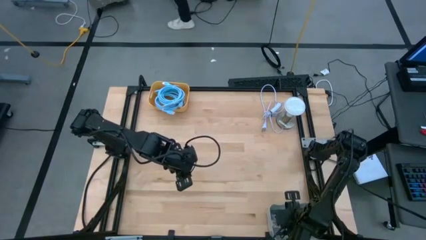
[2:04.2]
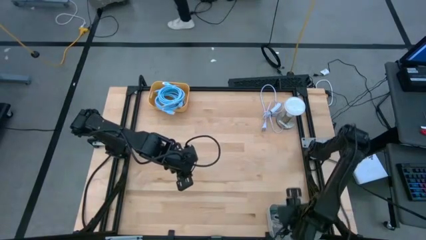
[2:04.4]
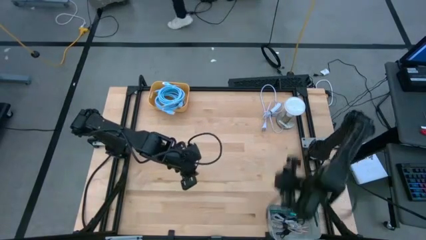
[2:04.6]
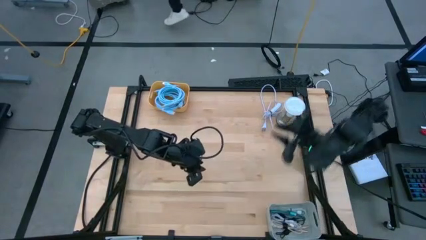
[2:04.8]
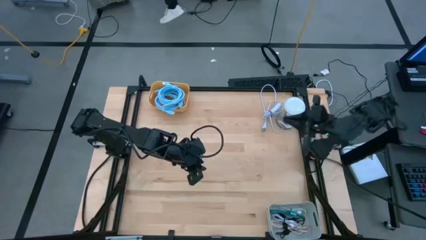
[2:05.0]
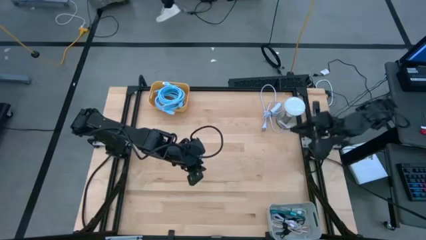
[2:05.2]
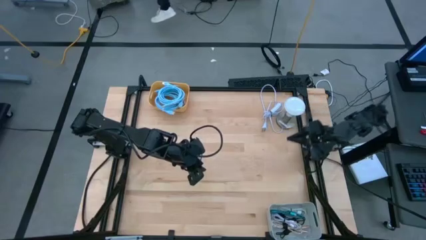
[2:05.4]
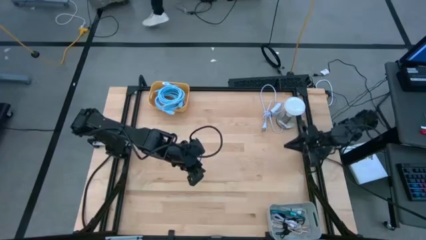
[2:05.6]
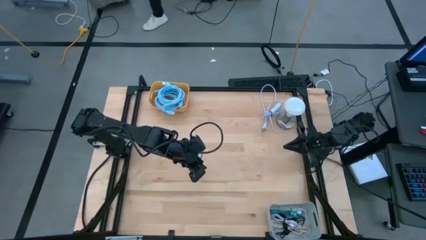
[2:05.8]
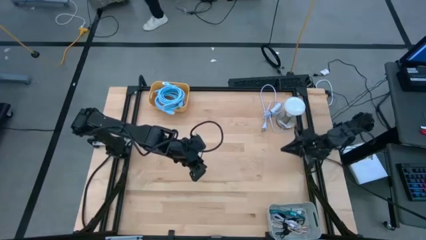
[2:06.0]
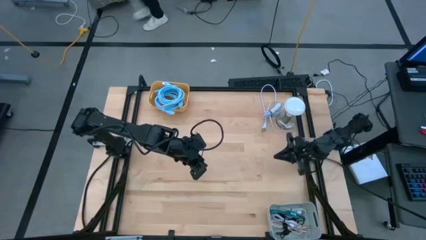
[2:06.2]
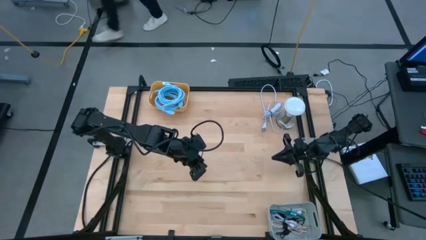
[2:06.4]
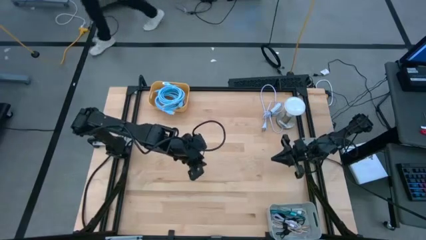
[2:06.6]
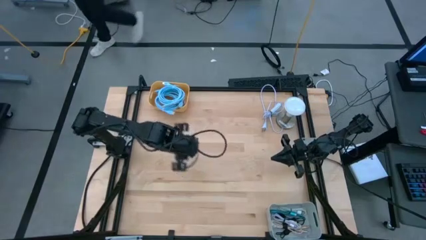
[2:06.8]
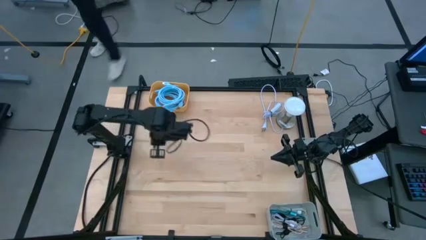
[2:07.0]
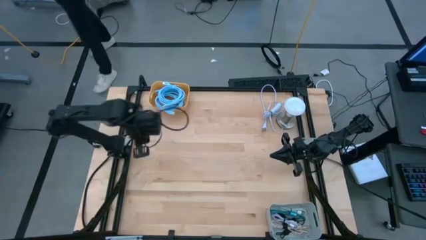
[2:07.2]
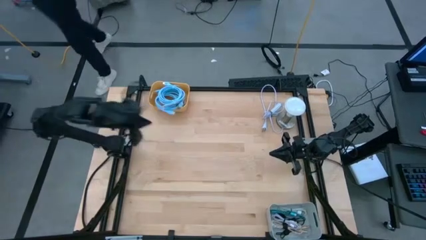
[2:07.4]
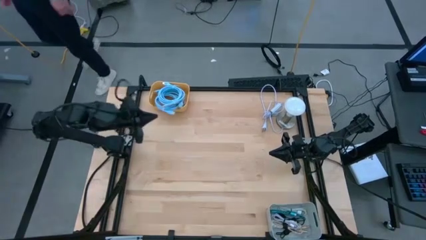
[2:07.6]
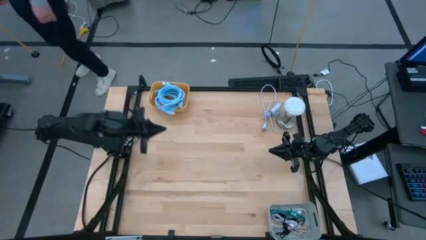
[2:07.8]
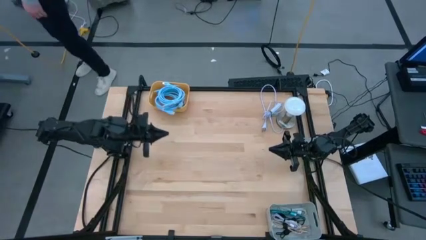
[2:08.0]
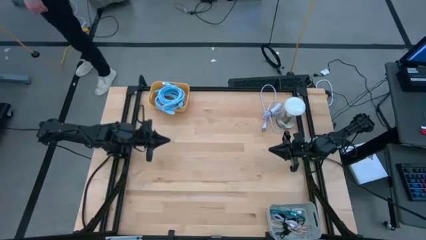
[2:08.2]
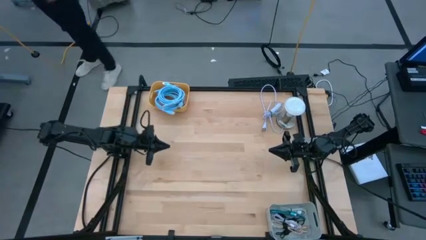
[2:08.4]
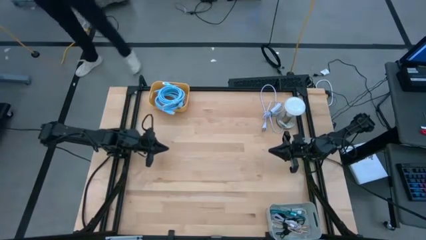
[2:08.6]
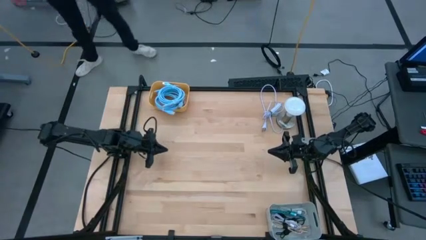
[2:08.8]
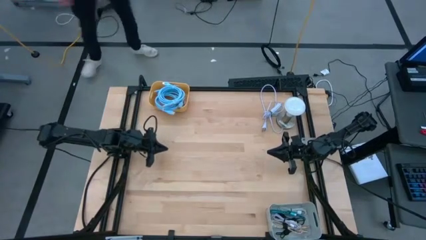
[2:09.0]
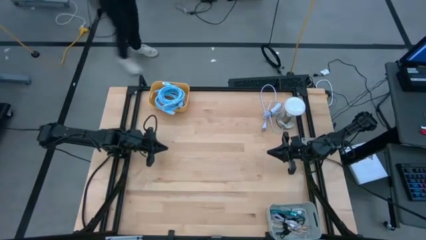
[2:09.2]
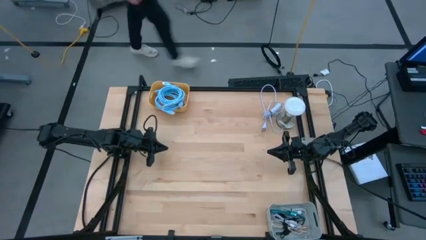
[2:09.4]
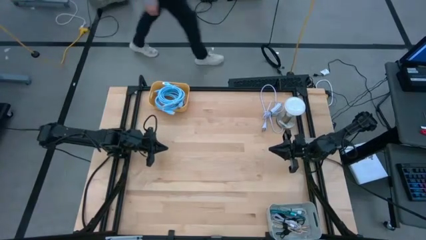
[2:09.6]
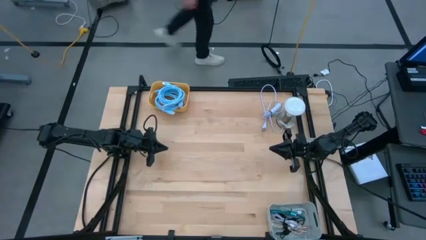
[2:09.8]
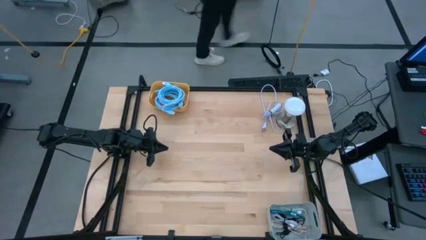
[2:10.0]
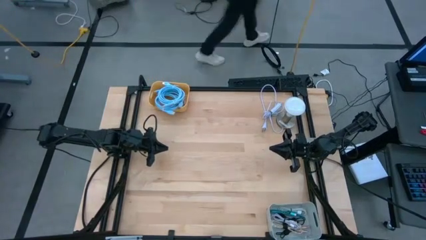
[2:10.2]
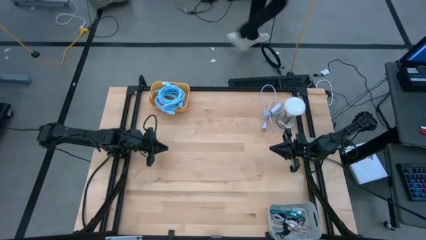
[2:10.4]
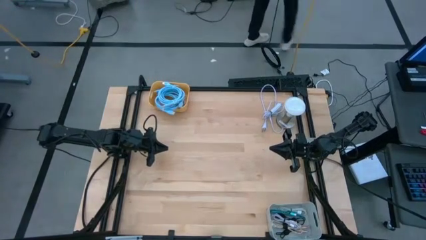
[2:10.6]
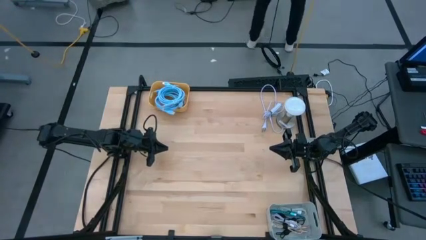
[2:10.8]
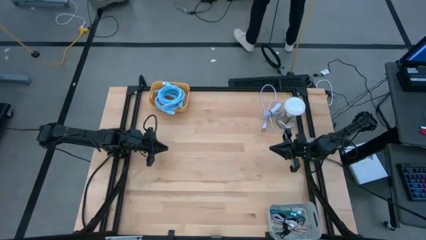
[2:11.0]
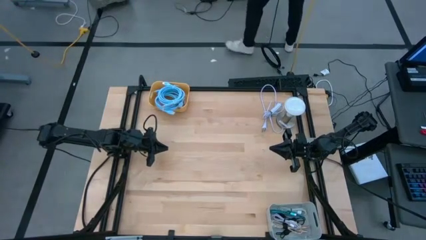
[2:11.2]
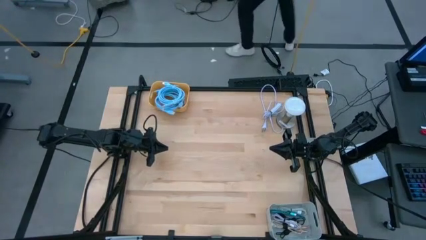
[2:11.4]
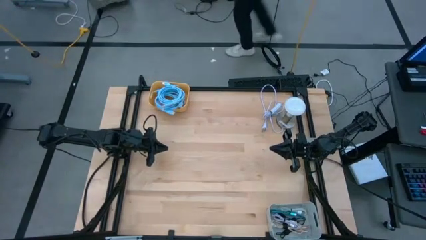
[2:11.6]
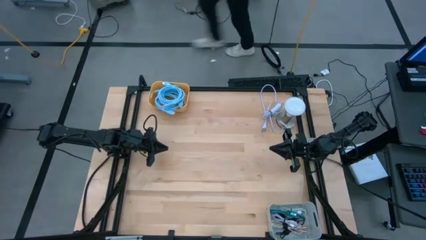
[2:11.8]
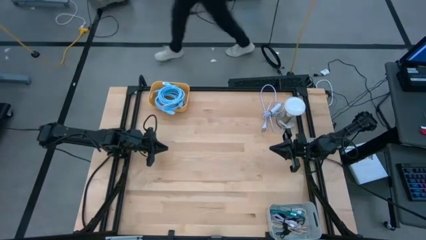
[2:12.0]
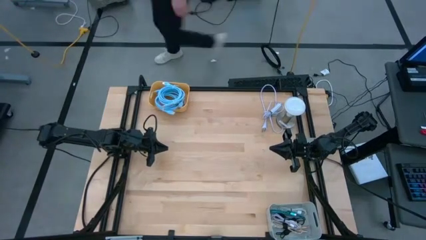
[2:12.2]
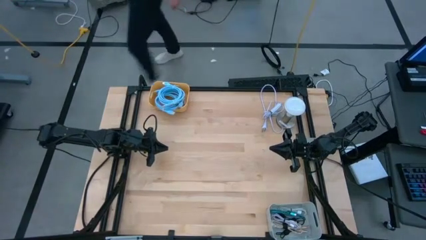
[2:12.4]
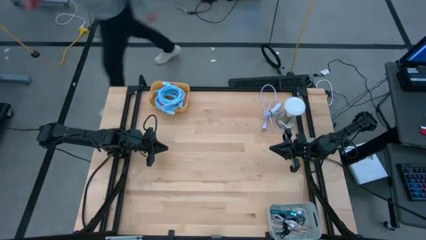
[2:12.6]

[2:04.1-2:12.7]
Task: Pick & Place USB Port
Return to Home Position

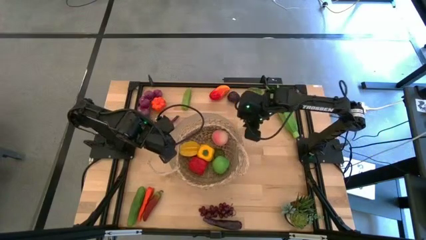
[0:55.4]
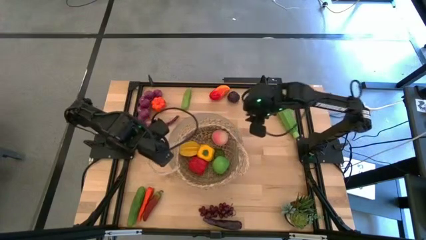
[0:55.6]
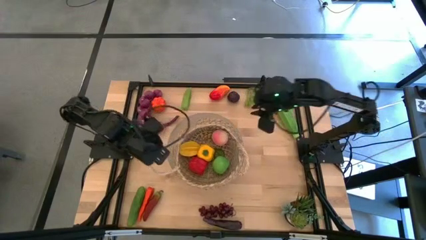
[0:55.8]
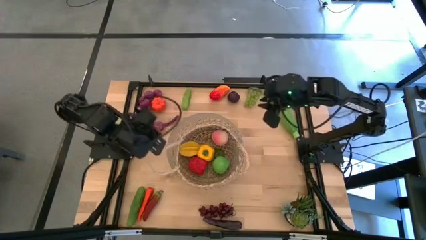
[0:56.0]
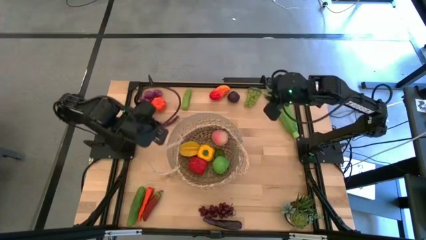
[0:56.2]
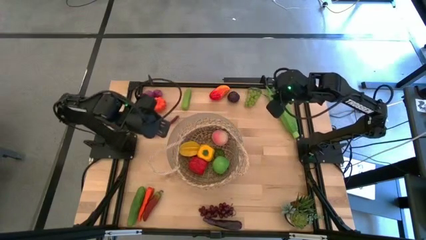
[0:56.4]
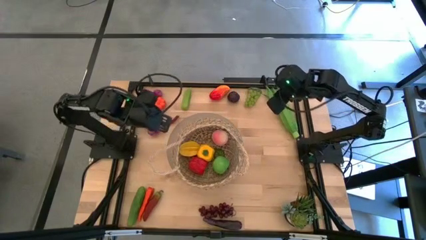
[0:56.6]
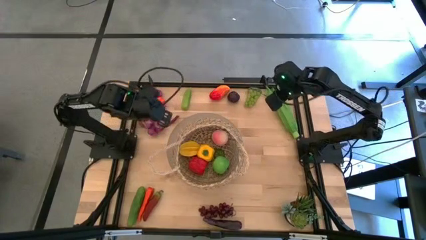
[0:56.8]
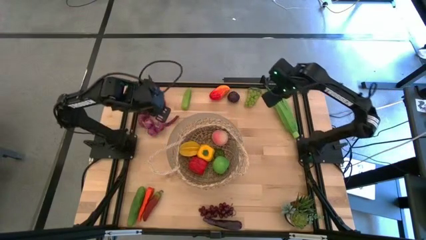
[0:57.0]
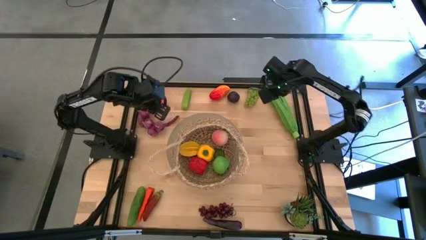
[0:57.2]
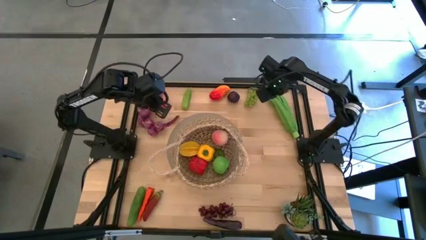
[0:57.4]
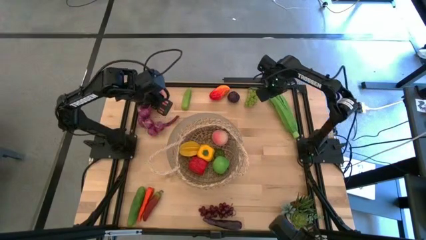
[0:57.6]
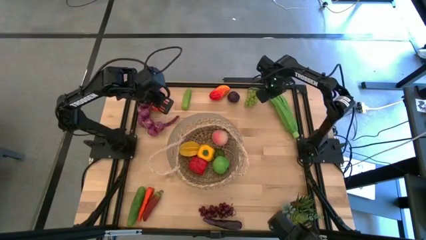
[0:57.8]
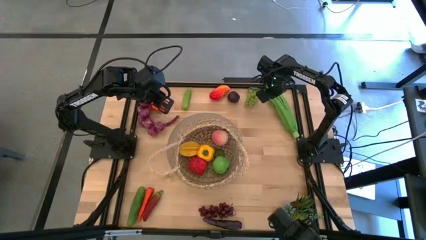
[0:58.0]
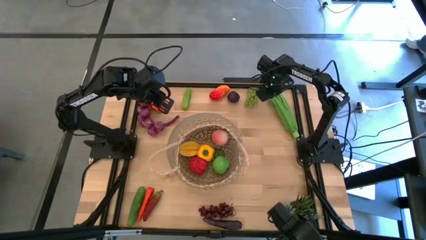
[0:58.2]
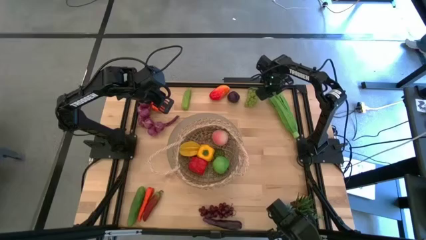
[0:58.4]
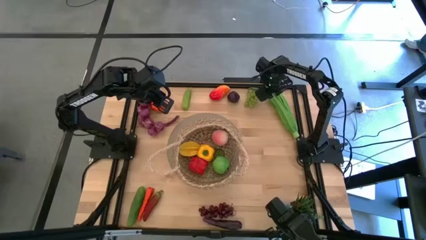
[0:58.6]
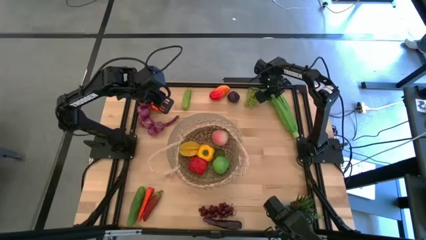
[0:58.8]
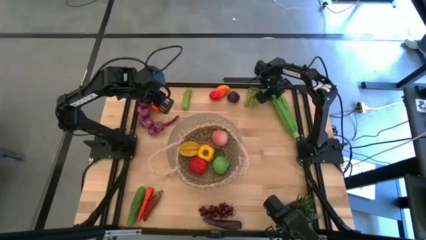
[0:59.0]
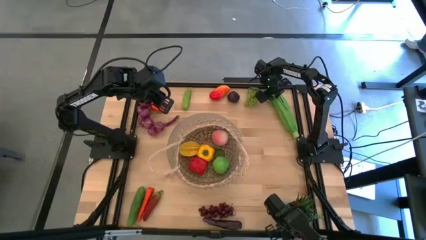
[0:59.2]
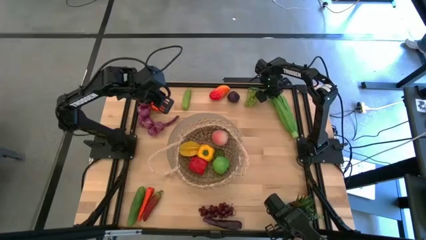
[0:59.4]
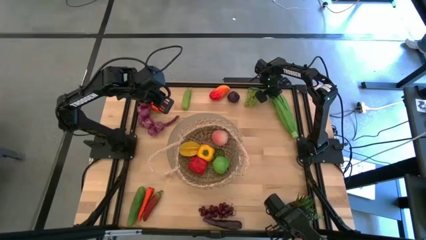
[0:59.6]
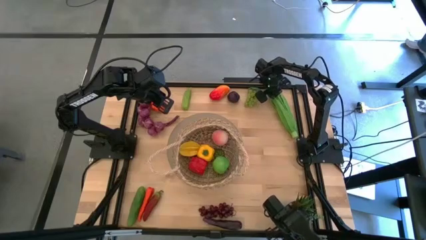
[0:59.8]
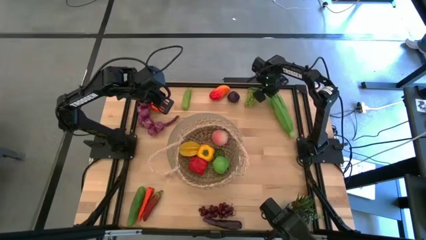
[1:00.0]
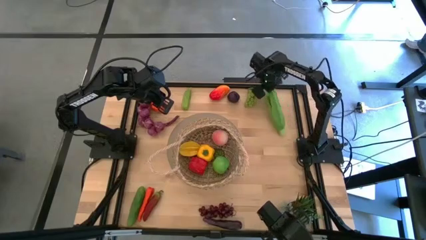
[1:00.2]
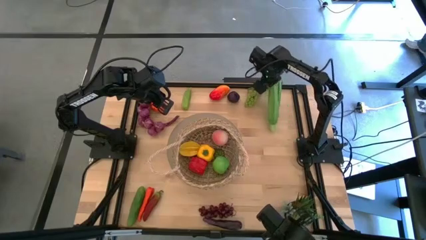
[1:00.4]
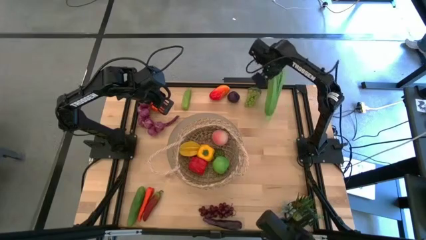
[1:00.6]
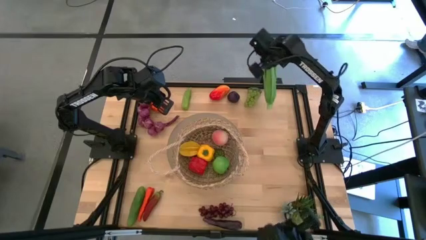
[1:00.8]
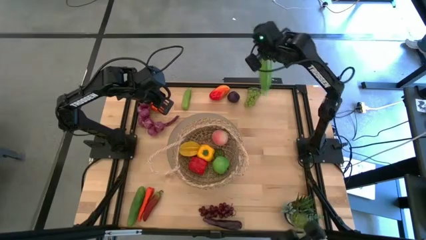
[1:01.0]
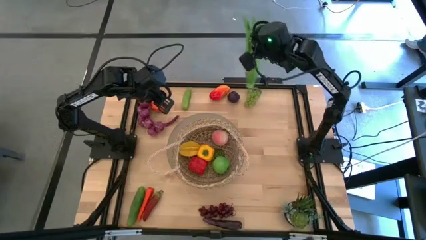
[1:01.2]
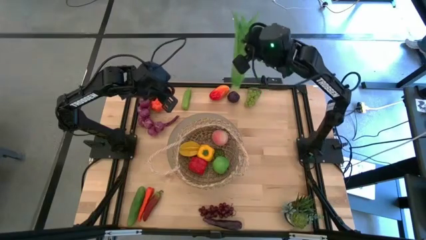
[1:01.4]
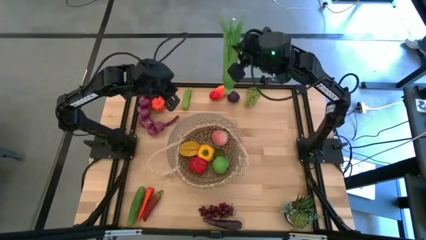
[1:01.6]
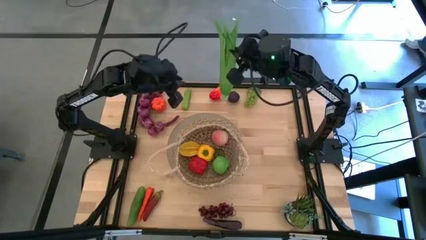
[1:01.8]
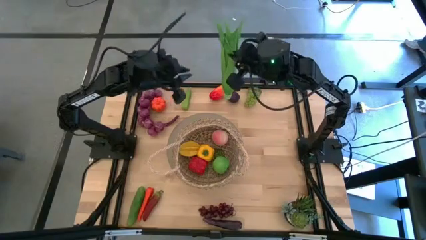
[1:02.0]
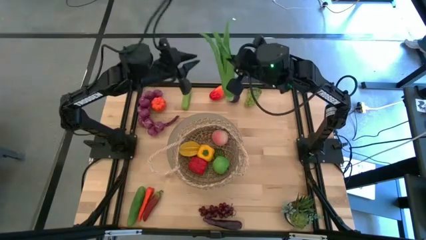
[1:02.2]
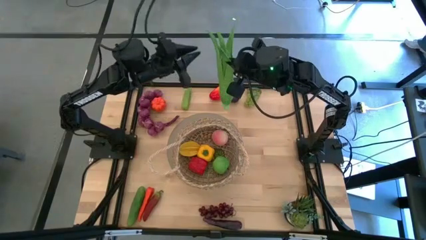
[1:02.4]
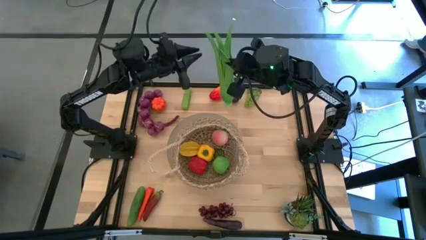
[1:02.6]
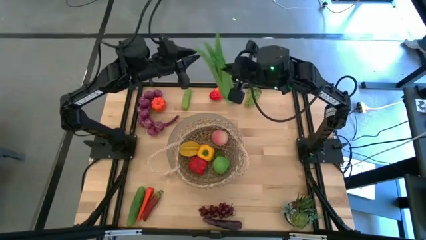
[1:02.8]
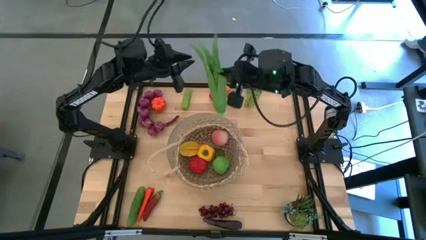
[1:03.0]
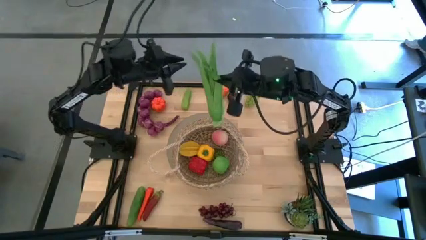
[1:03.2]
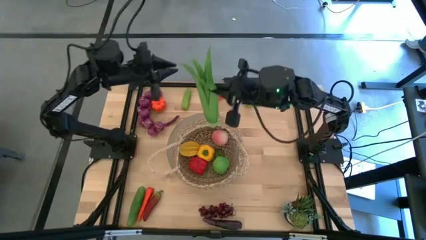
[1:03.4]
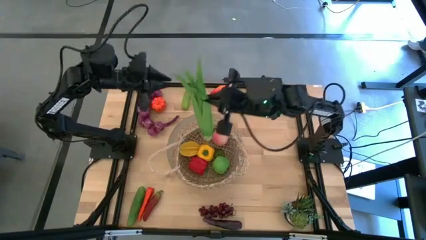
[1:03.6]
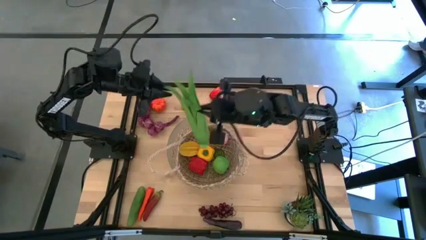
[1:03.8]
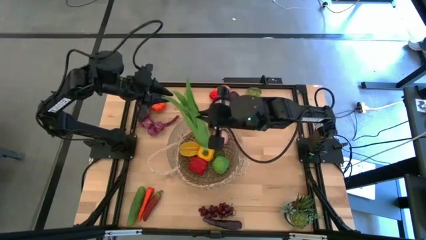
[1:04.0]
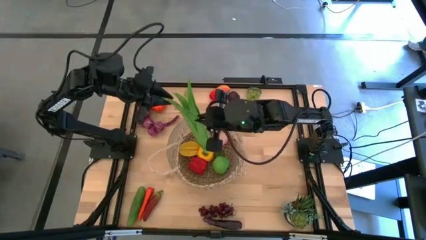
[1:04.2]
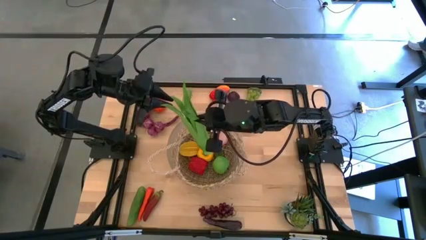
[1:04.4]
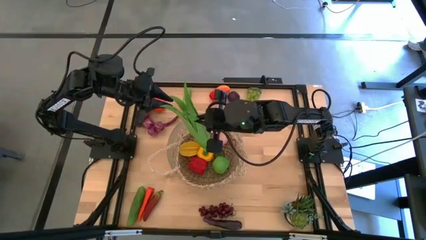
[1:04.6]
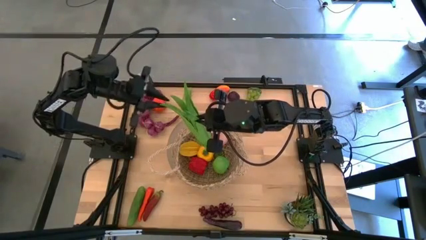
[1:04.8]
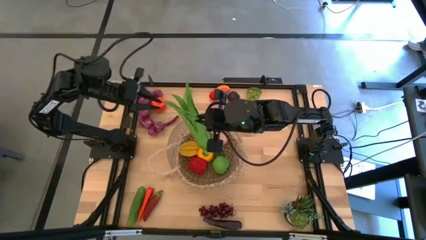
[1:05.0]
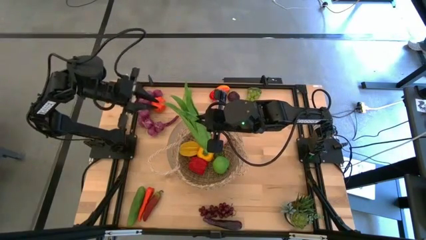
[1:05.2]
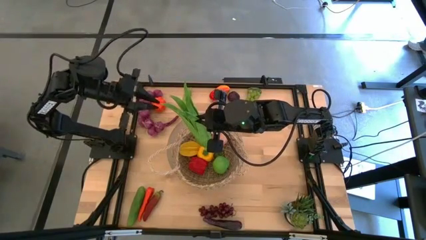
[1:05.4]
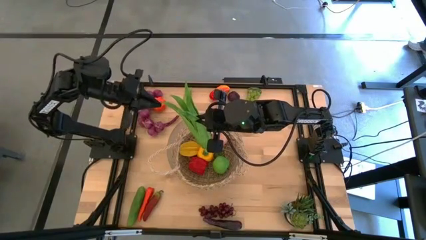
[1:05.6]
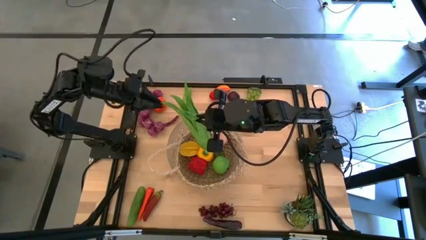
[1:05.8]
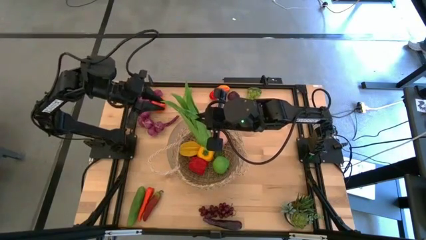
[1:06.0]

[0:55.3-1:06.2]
Task: Build produce basket
Put the green leaf lettuce into the brown basket
